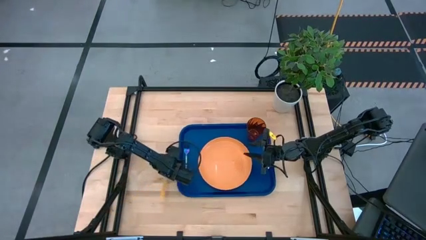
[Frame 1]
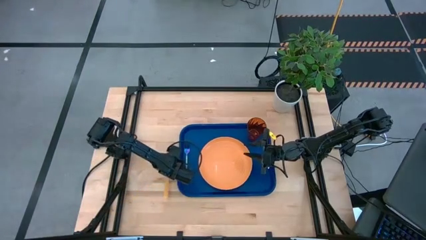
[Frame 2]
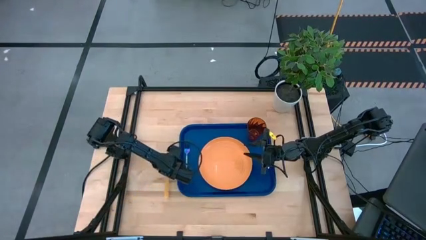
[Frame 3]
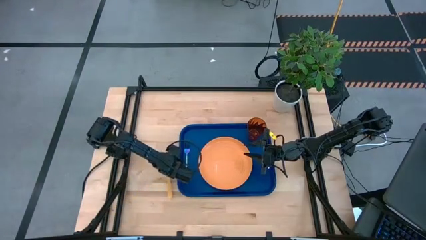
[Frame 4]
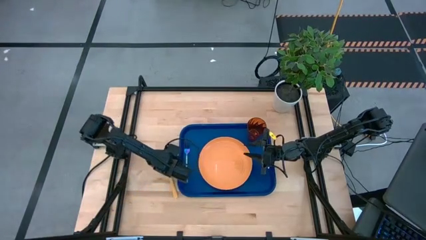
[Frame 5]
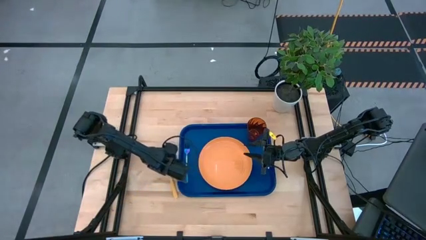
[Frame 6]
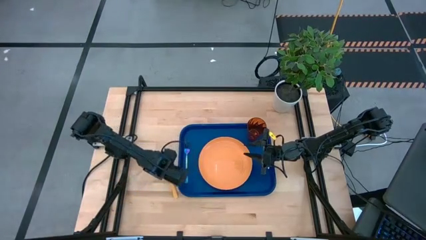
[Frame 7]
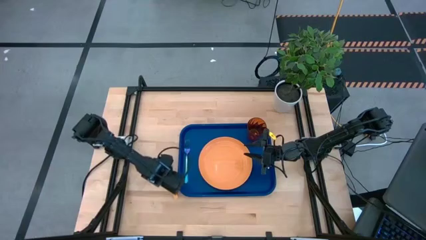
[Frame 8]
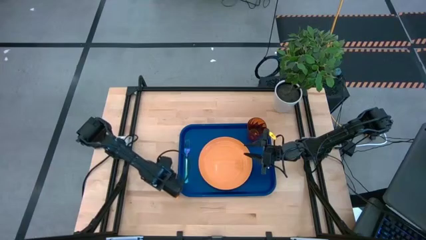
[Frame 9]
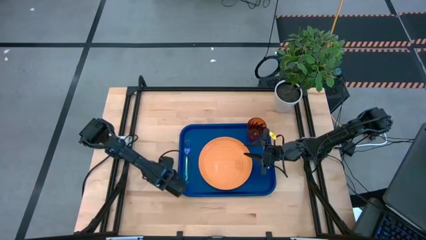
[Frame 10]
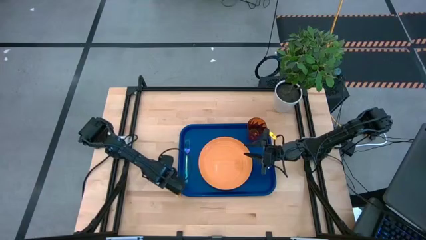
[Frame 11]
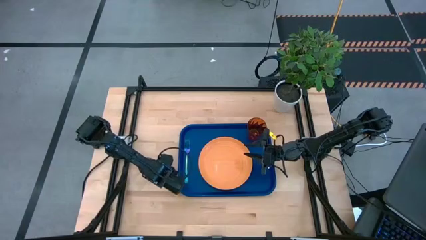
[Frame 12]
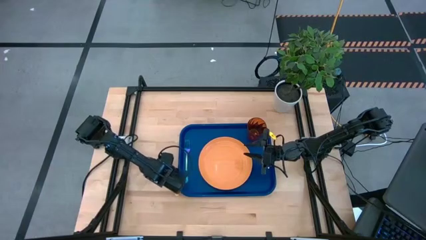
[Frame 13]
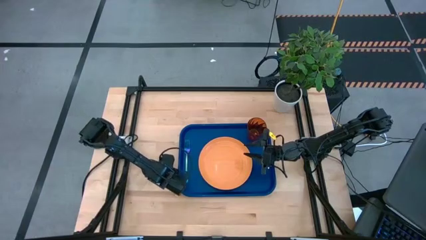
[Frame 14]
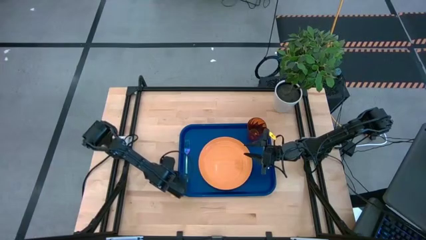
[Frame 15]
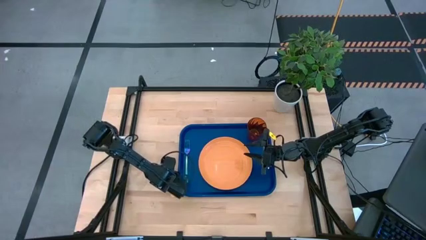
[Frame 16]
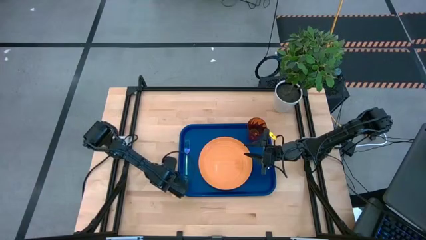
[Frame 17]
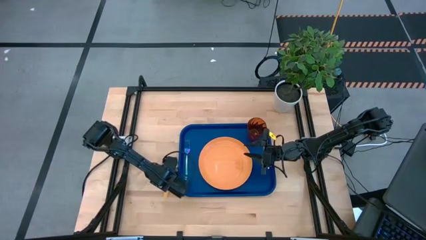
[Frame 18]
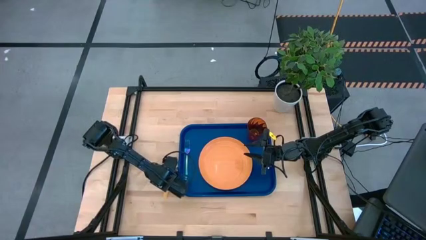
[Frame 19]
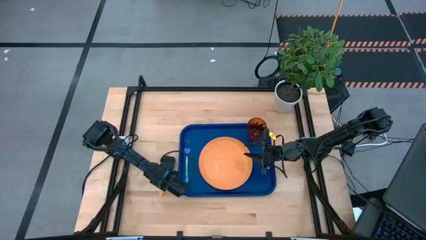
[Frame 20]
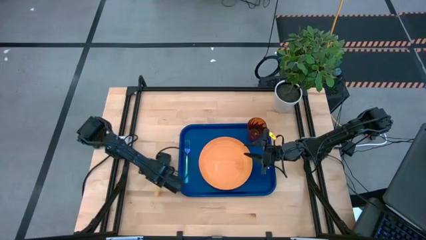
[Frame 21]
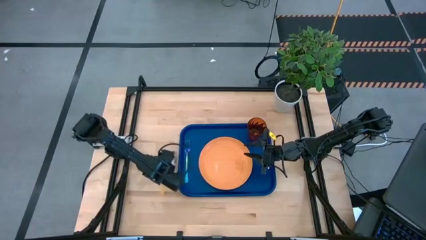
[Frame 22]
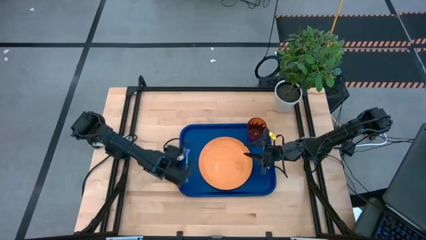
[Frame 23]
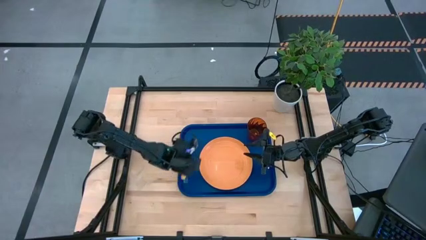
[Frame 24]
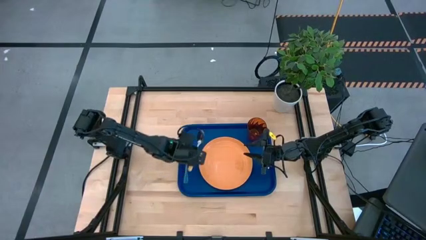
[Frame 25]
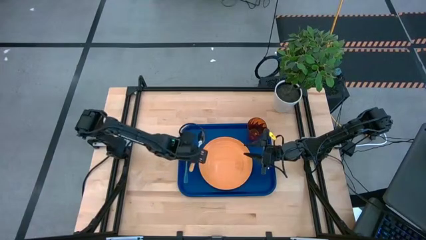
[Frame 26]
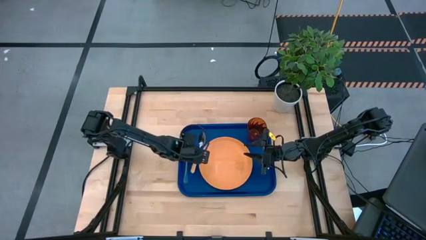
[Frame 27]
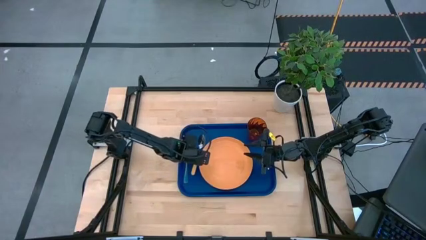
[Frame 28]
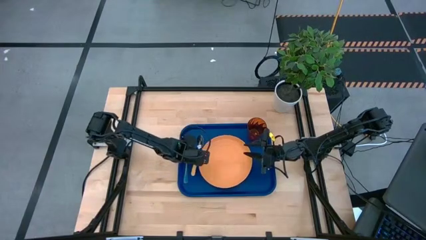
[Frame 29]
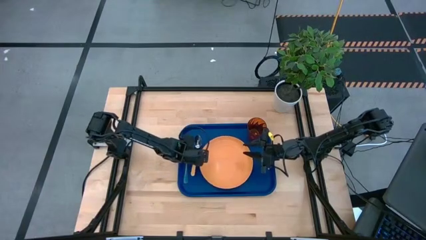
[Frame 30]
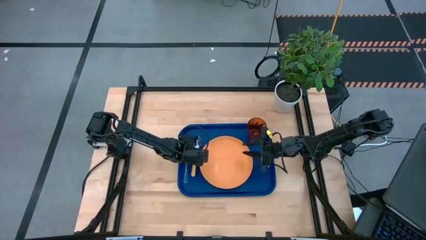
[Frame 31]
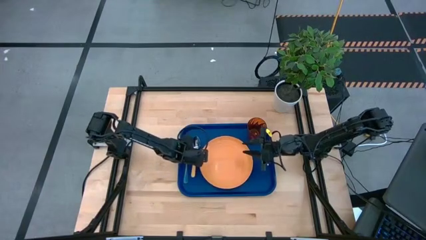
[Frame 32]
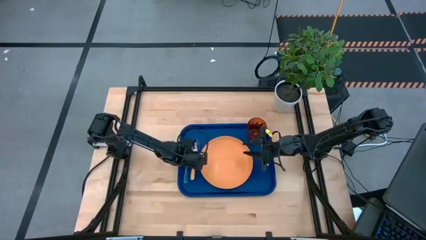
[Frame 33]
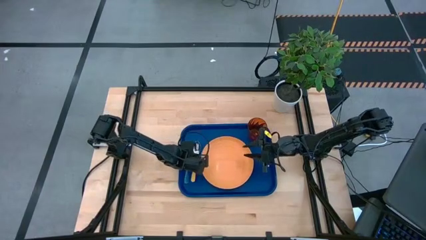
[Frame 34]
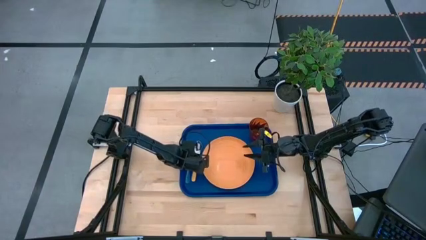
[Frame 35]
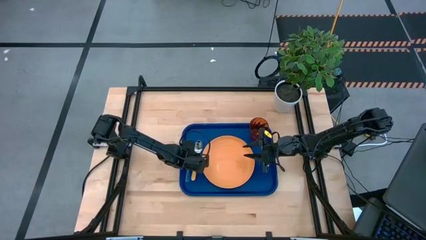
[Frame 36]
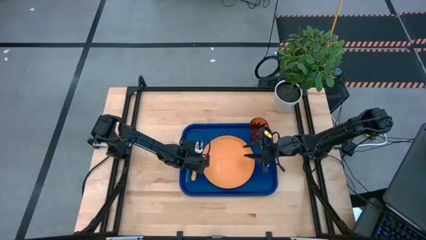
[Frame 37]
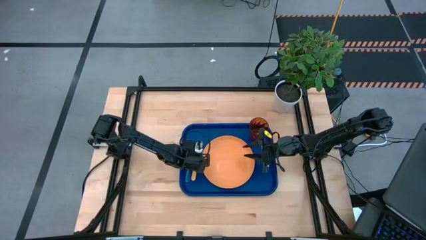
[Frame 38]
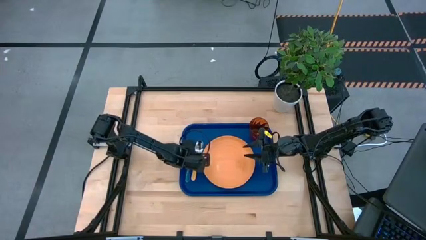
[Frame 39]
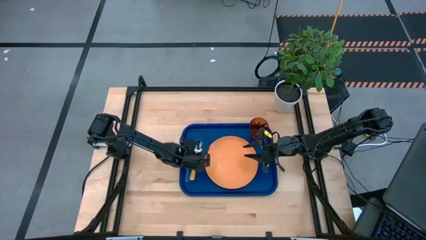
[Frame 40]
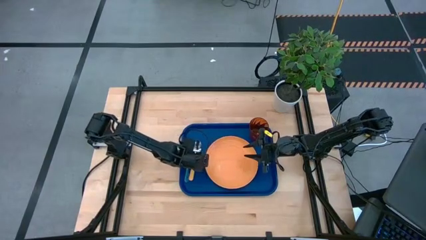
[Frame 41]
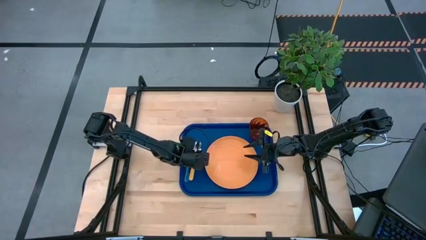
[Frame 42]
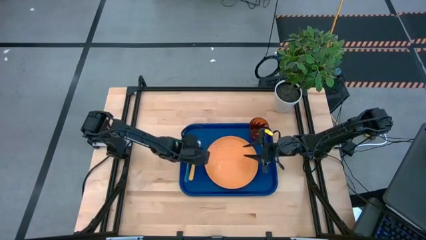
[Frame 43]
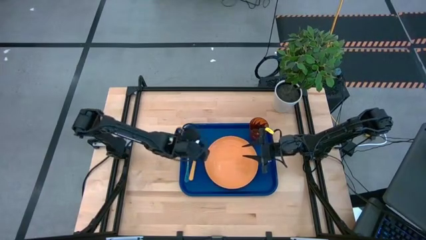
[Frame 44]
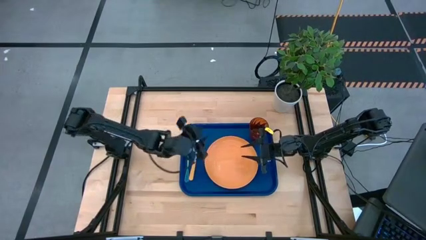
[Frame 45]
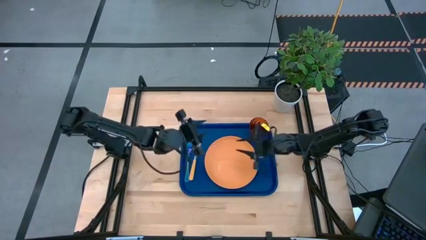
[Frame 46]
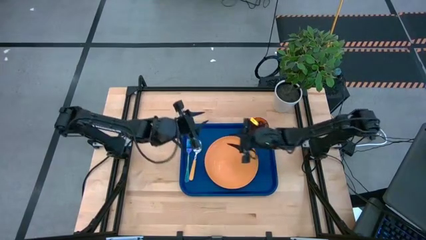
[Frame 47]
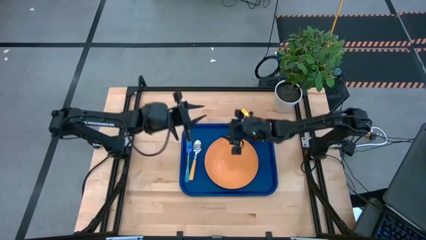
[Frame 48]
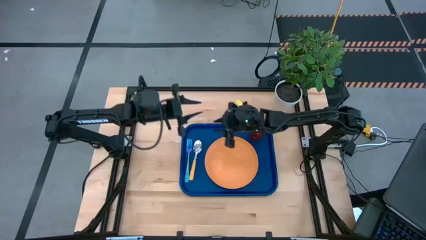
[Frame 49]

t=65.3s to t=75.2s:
Task: Pick and place plate/cup/fork/spoon on tray
Put the orange fork to the right of the blue fork on the blue tray

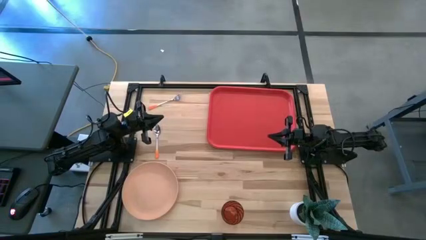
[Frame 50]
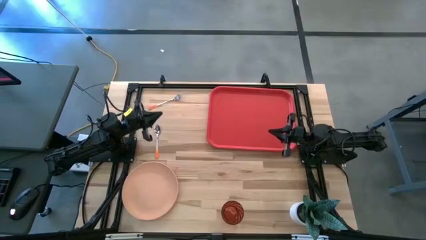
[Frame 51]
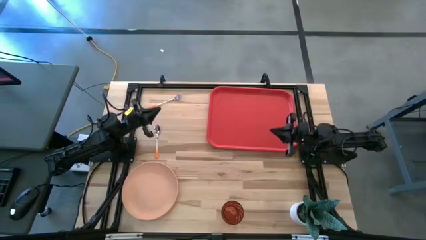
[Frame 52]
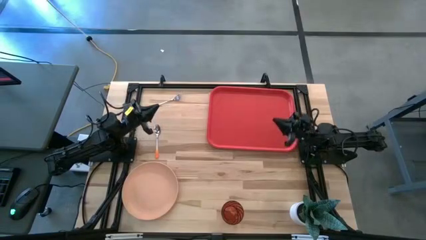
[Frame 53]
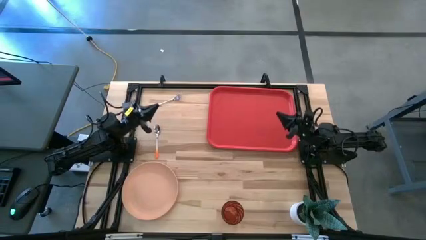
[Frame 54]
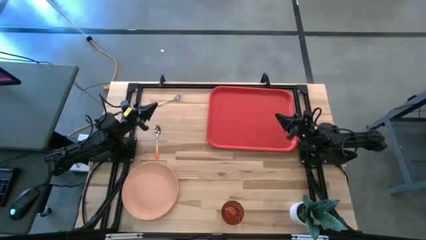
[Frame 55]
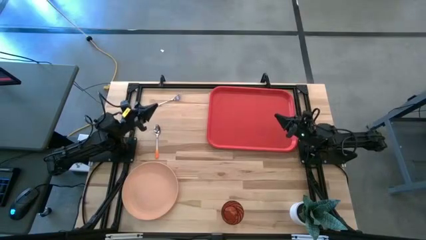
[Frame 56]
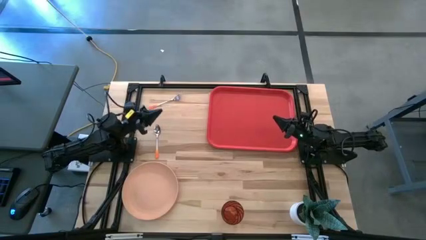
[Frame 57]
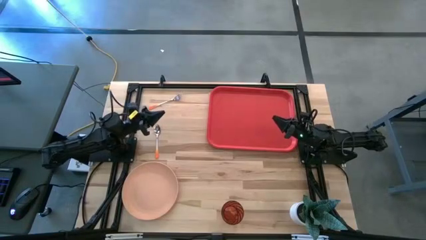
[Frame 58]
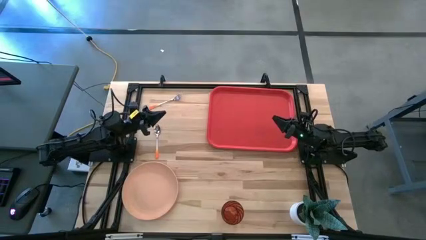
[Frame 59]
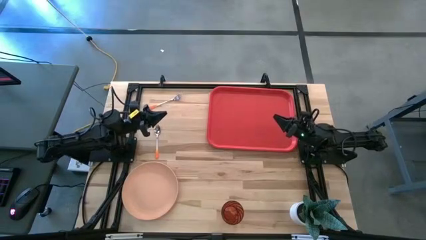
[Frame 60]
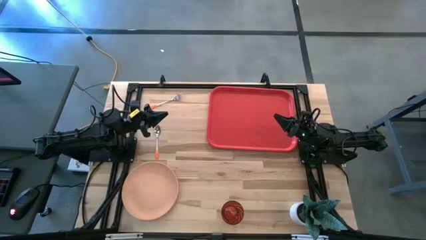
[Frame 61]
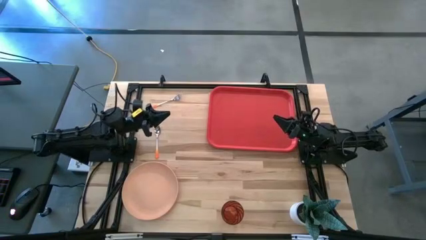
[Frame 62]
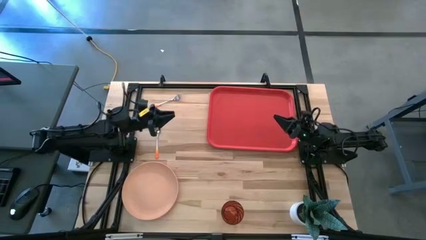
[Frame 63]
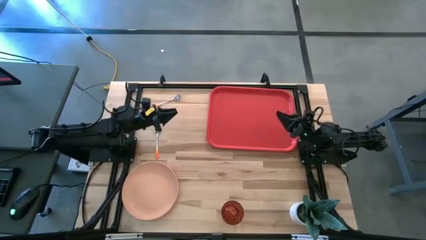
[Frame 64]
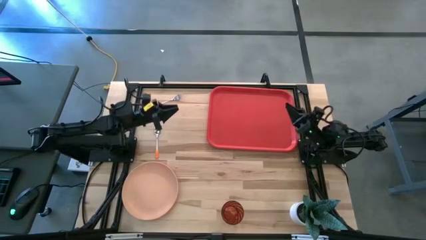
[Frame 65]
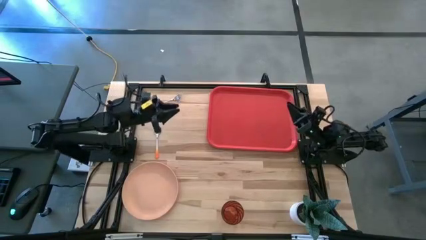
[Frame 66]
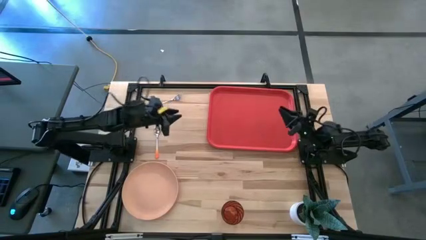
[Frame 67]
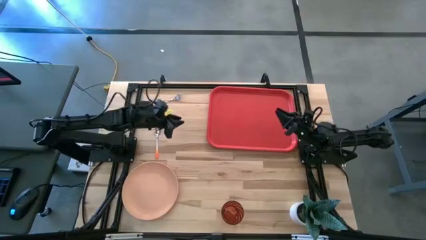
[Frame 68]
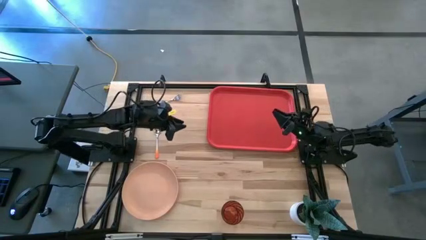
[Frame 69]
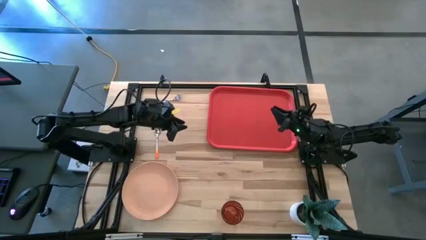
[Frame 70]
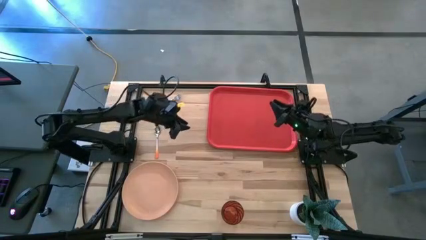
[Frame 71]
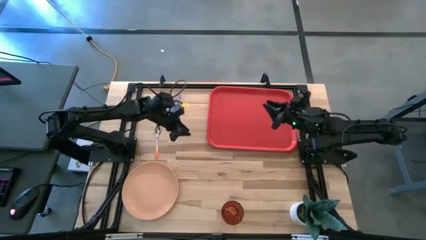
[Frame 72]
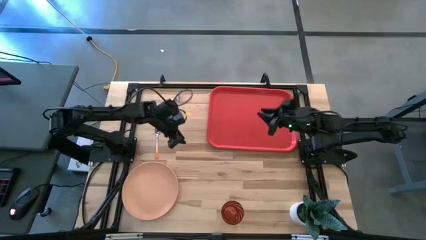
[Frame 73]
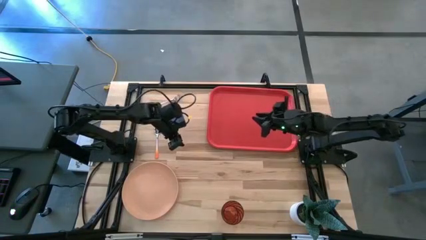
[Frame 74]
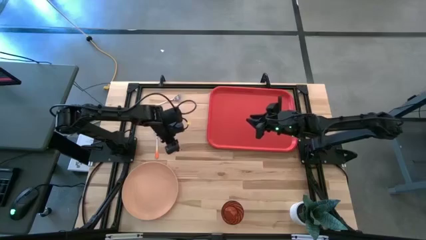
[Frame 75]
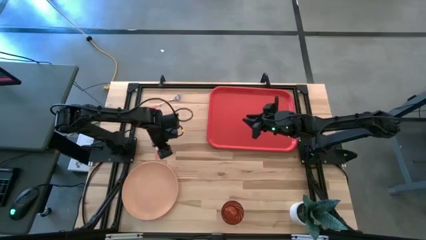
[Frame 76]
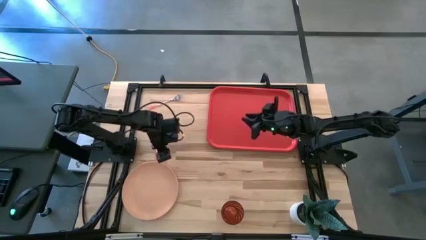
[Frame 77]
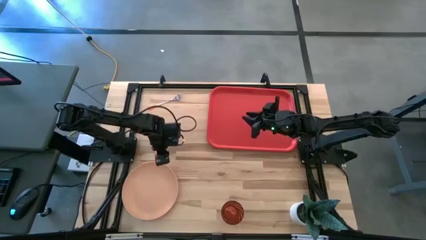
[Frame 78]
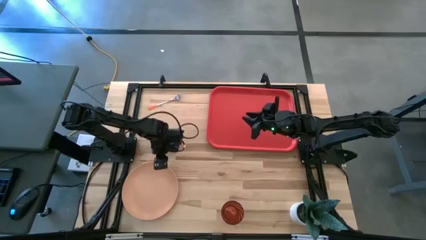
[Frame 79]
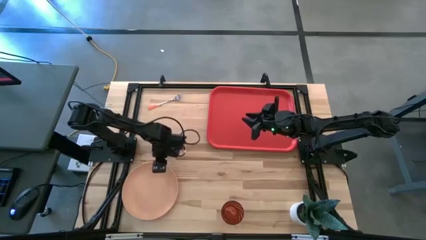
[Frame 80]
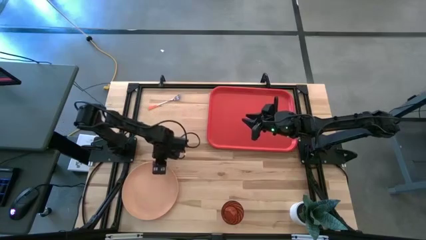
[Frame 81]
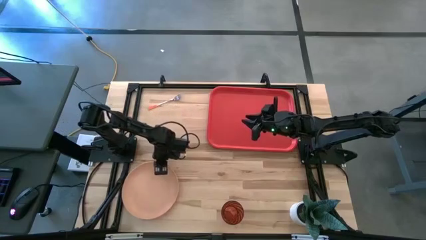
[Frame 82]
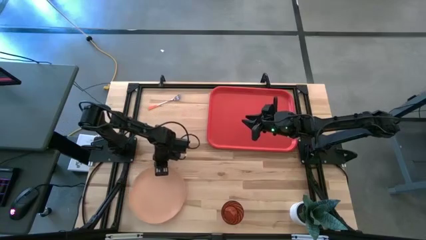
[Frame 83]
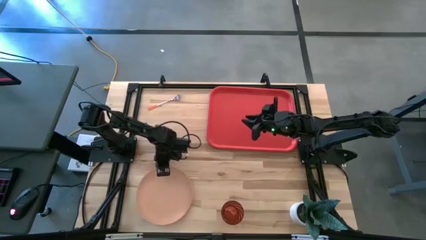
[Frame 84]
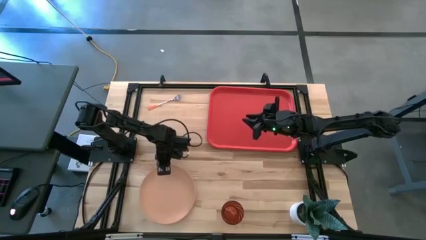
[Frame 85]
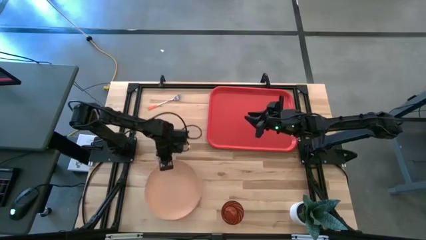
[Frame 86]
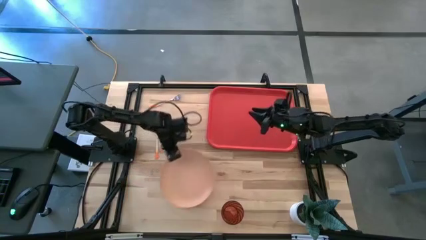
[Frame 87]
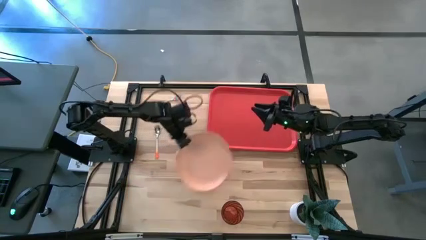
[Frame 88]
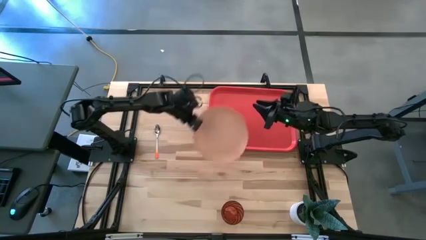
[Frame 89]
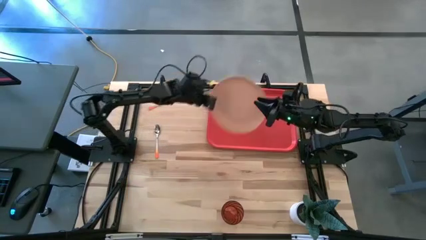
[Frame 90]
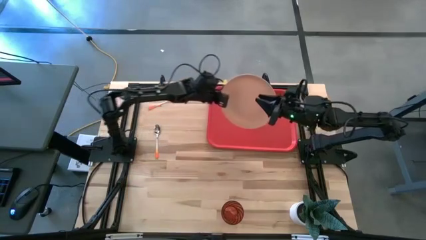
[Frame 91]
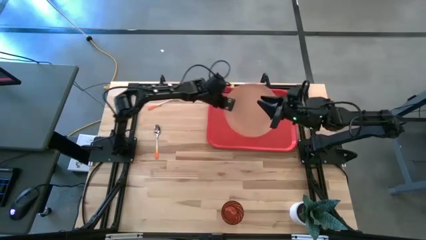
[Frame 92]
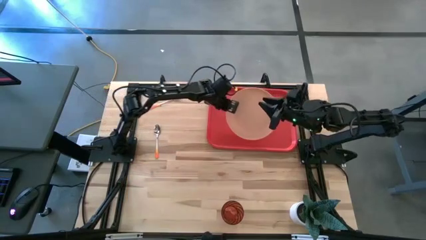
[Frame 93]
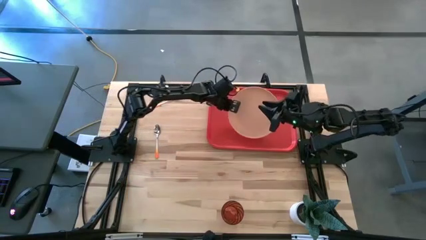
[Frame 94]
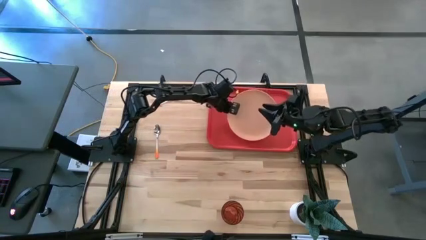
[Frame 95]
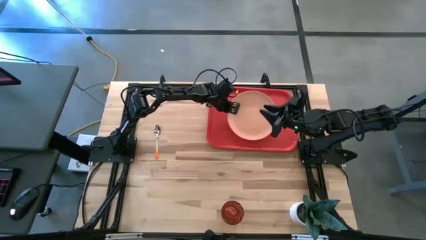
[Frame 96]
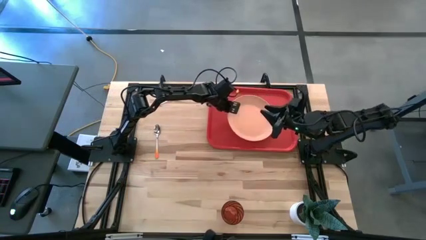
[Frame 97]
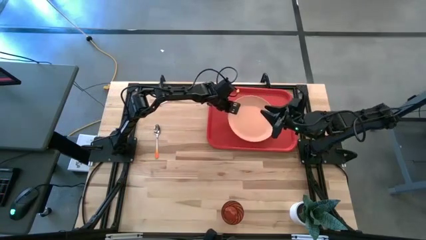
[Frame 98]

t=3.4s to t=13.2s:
Task: Pick and place plate/cup/fork/spoon on tray
Put the pink plate on the red tray
